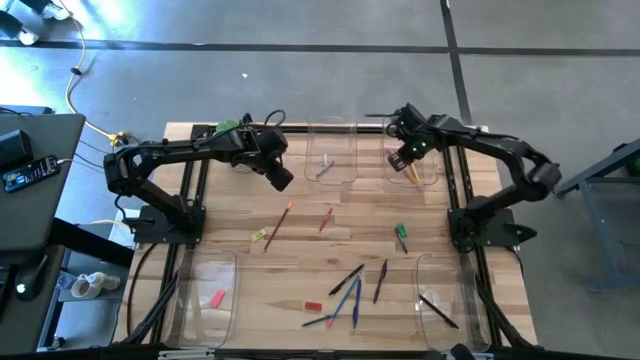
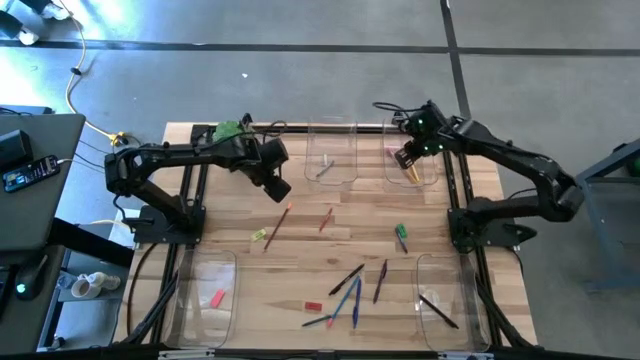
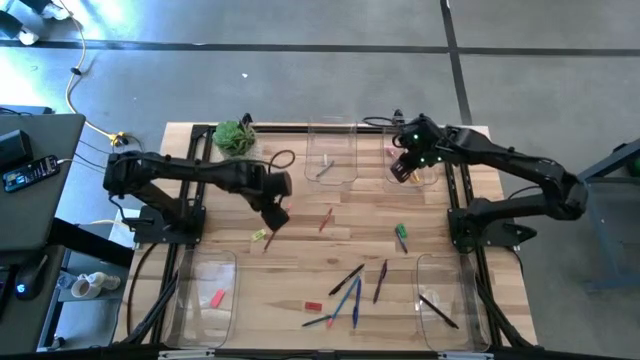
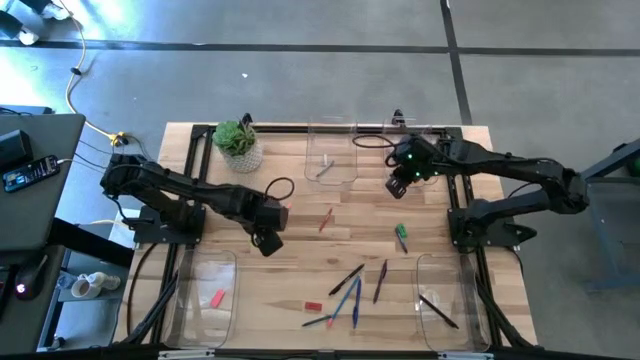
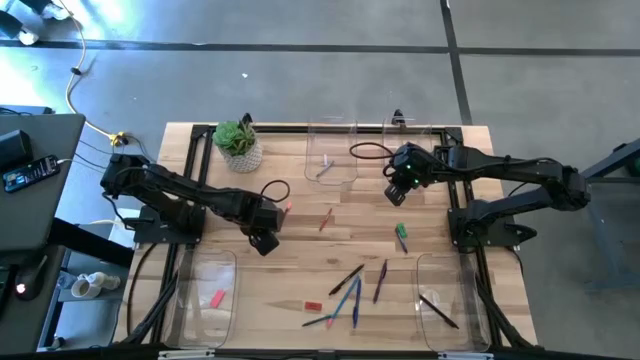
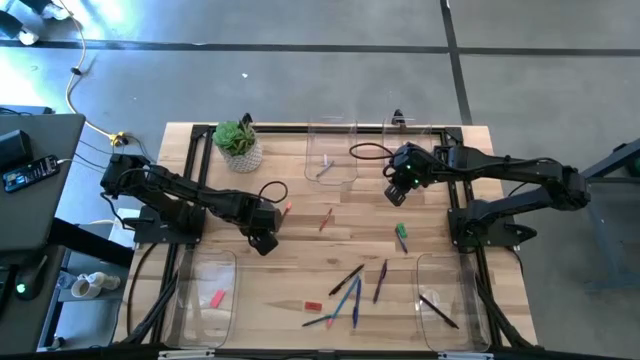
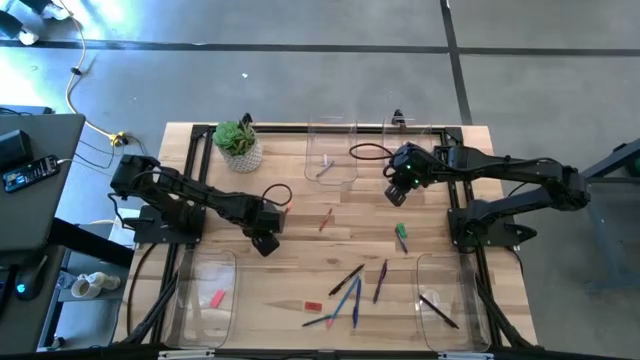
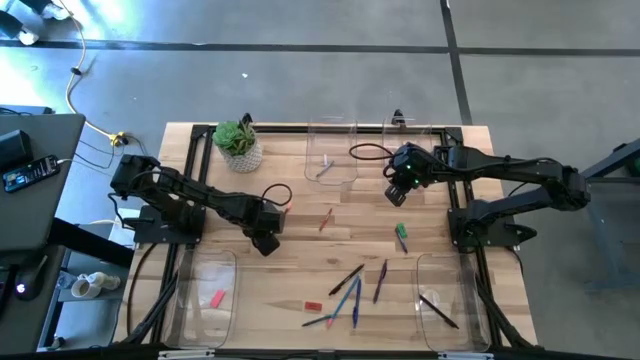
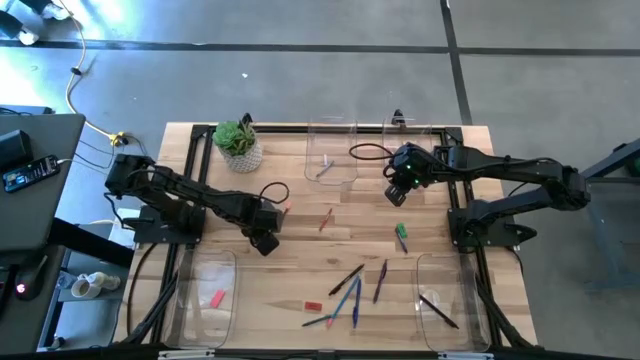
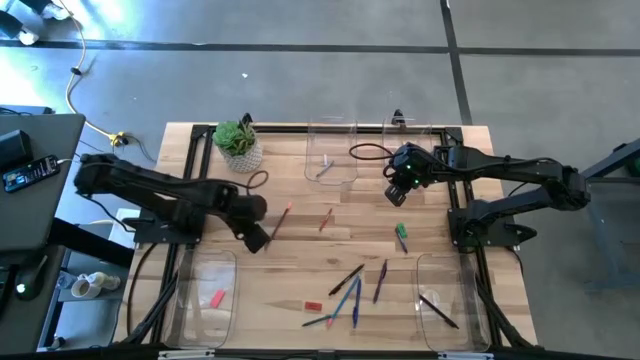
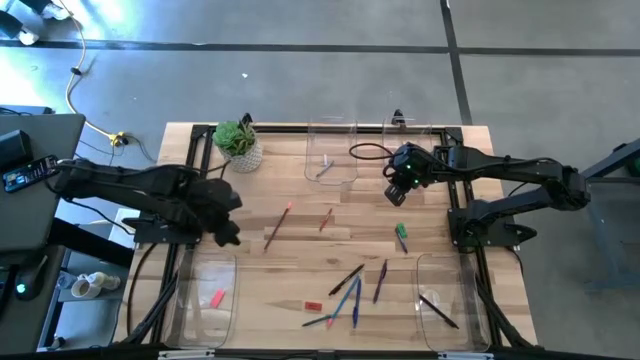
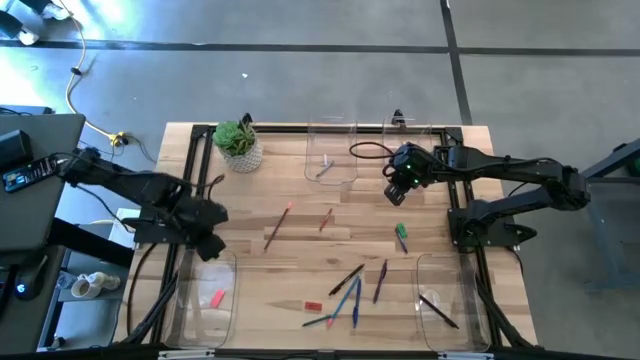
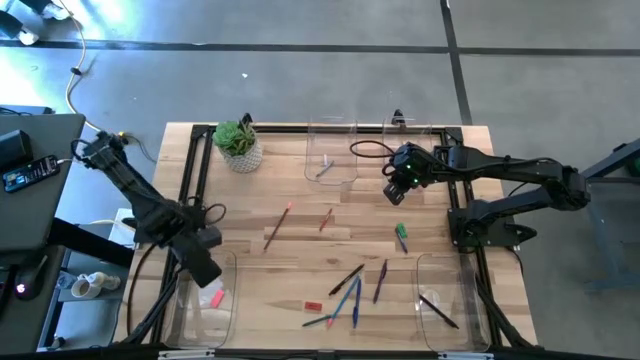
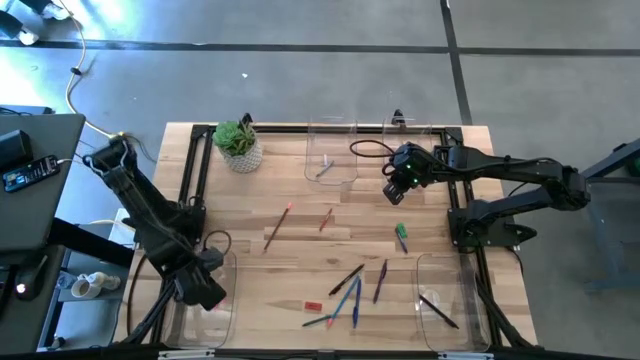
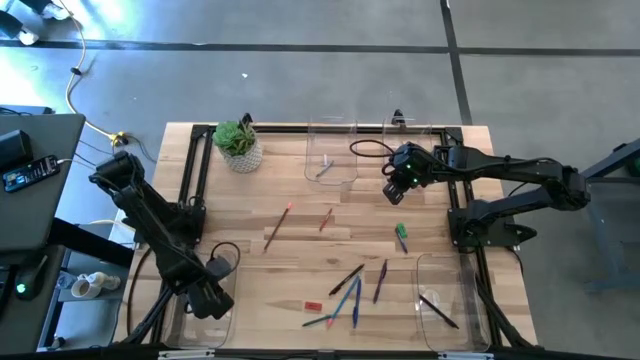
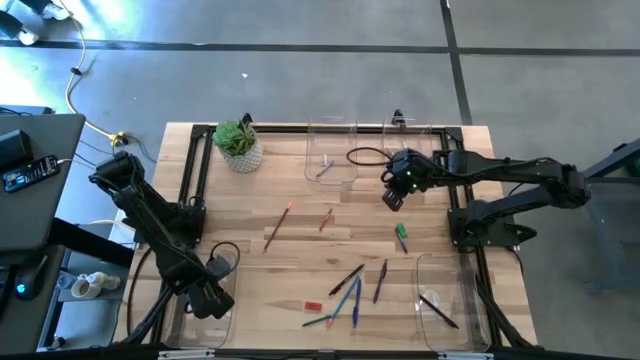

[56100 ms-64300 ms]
Task: Sort crayons/erasers/pens/pencils in bins
Put the light green eraser into the bottom left transparent bin

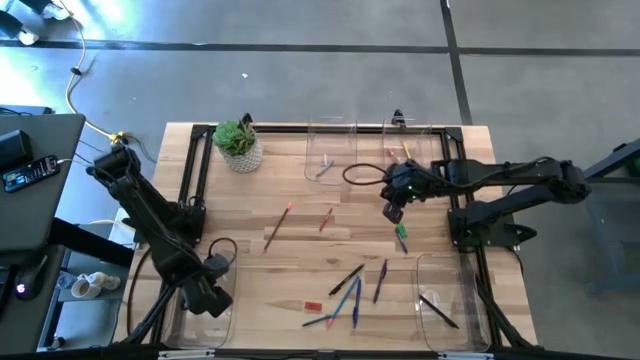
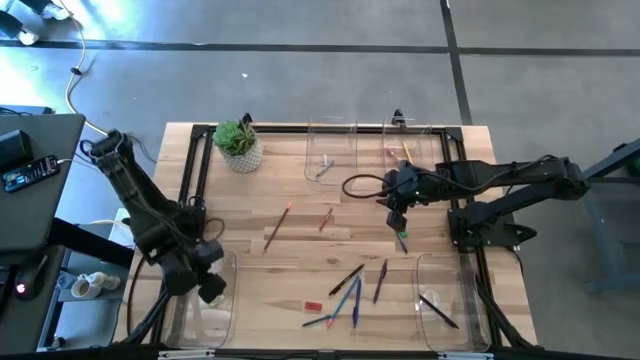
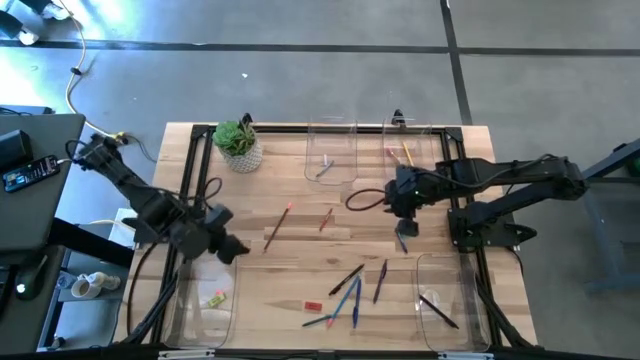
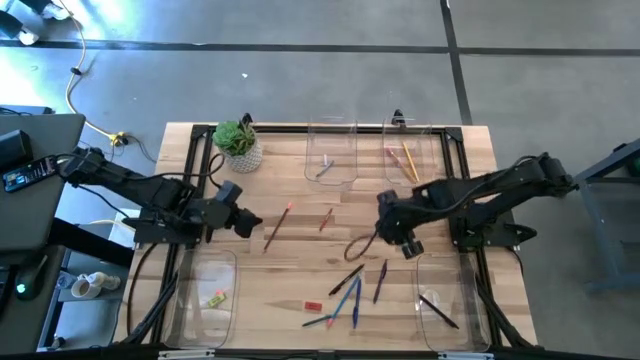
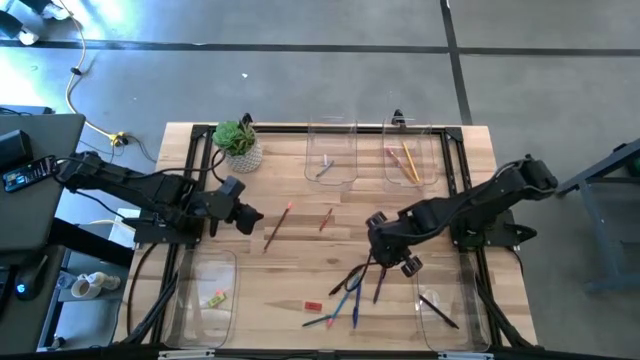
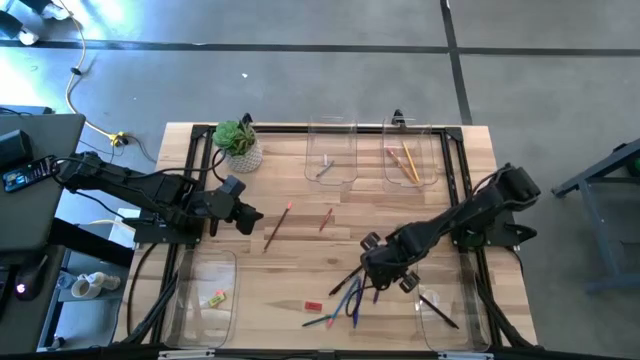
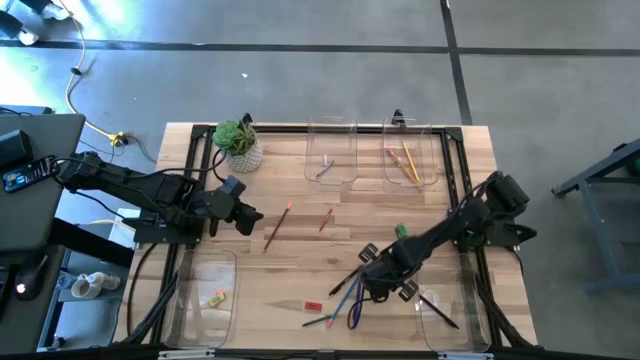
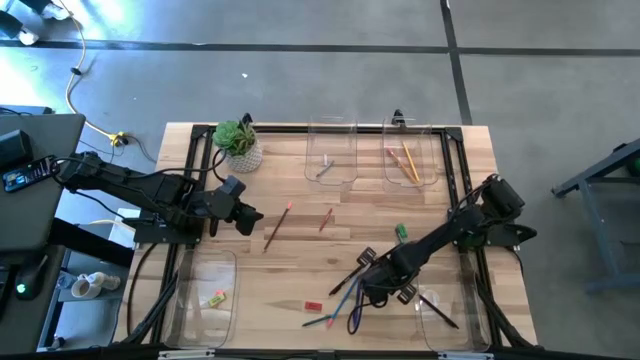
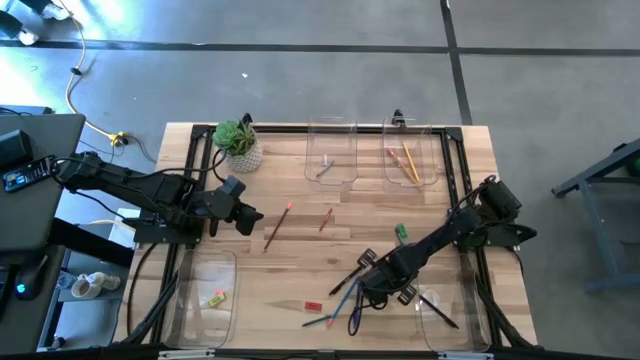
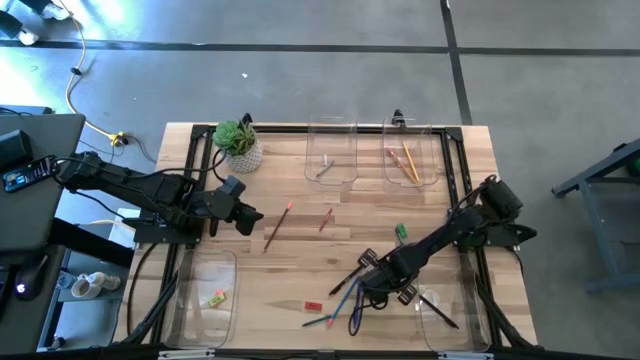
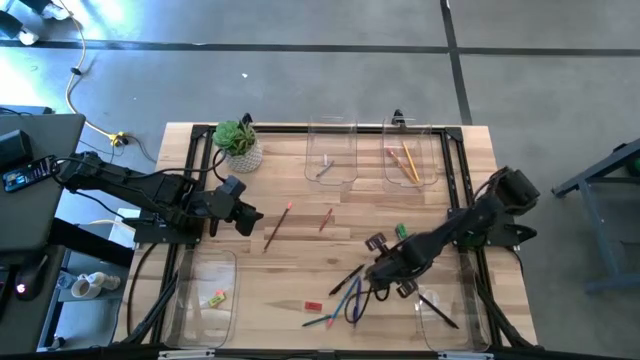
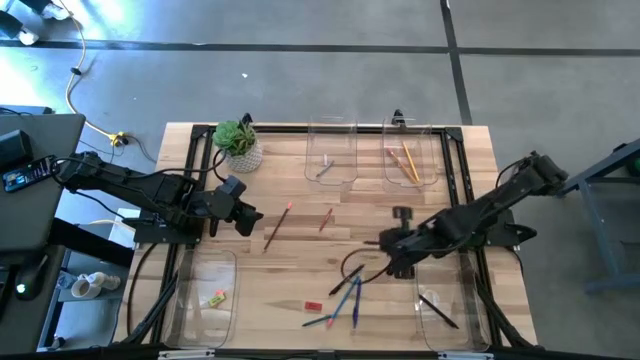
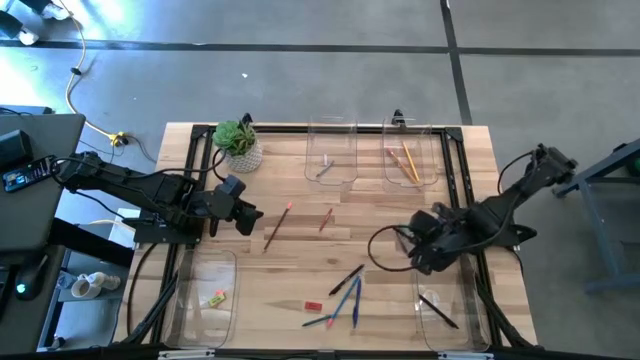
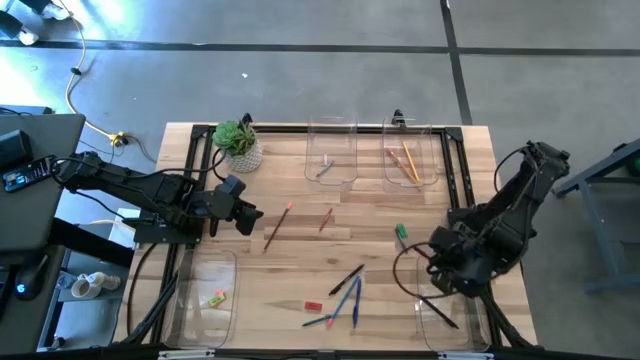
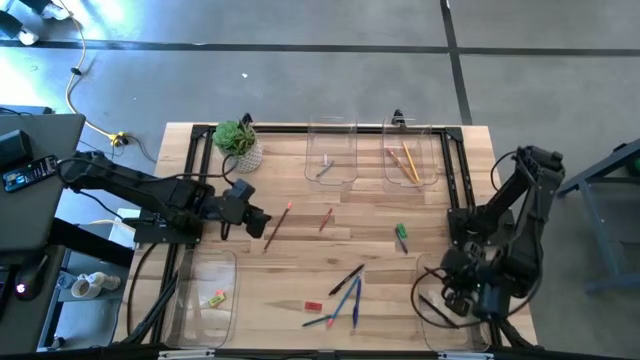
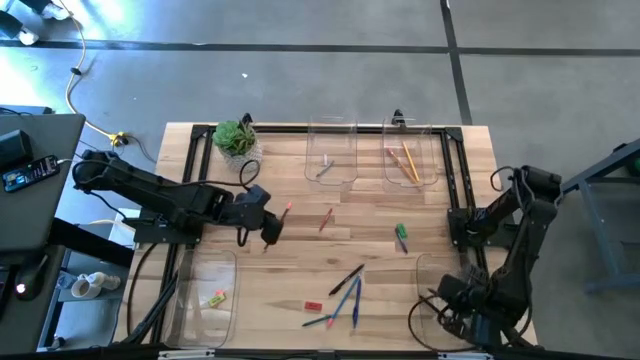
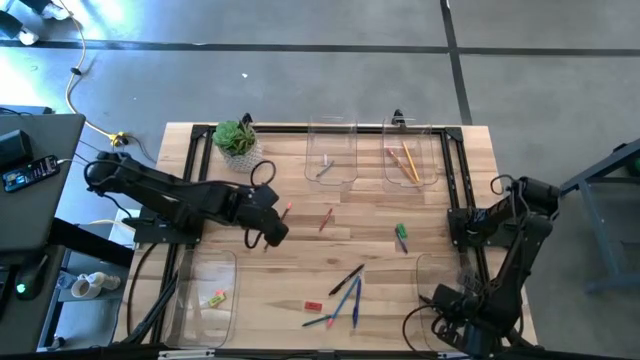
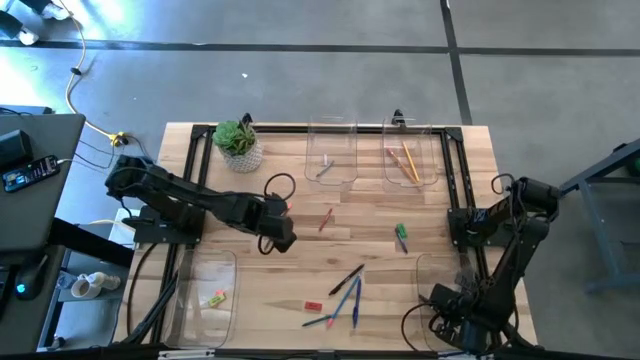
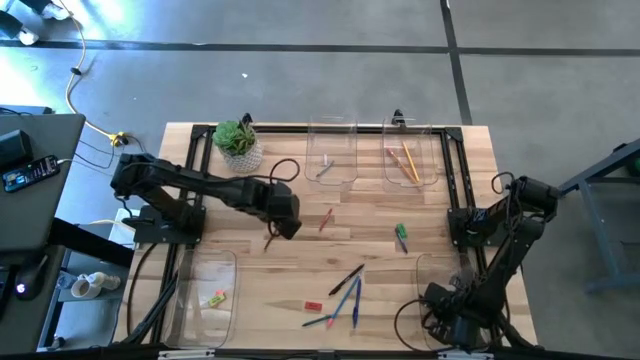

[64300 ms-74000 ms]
Put the purple pen into the bottom right transparent bin

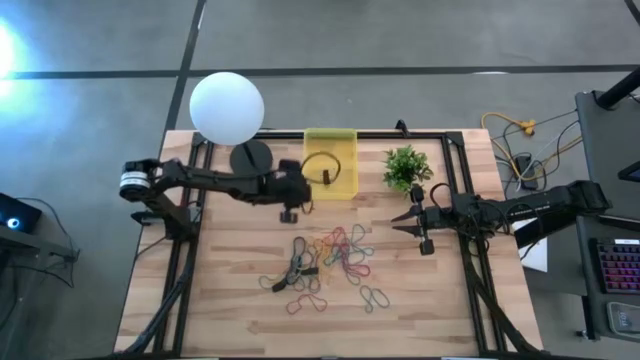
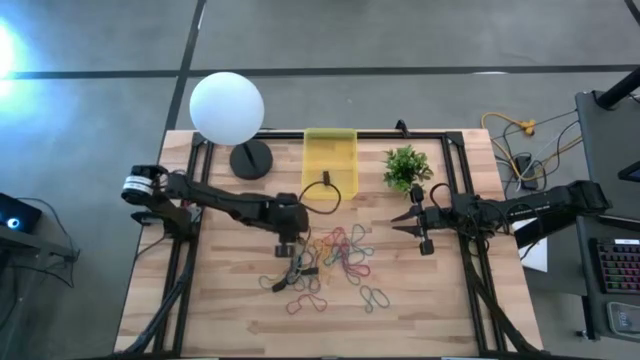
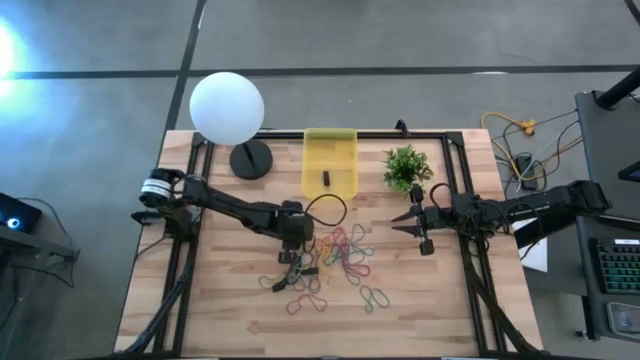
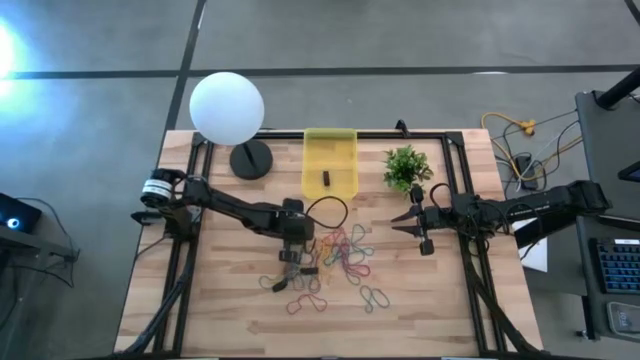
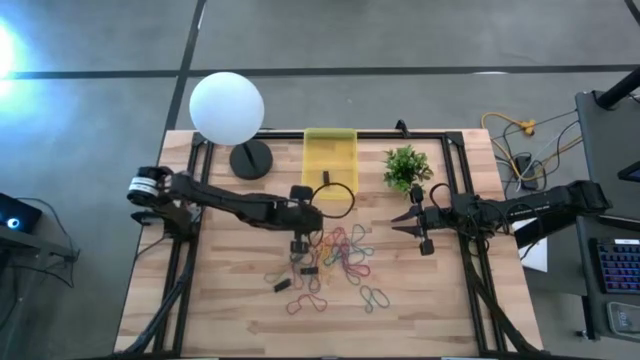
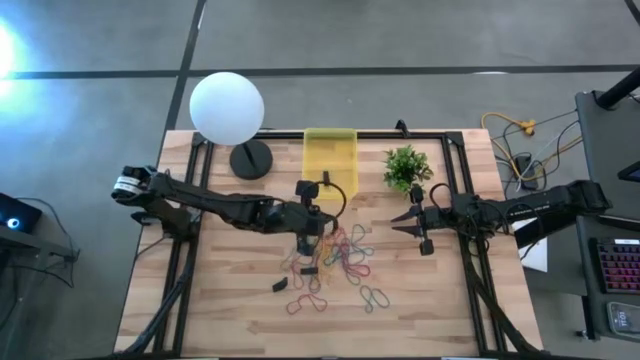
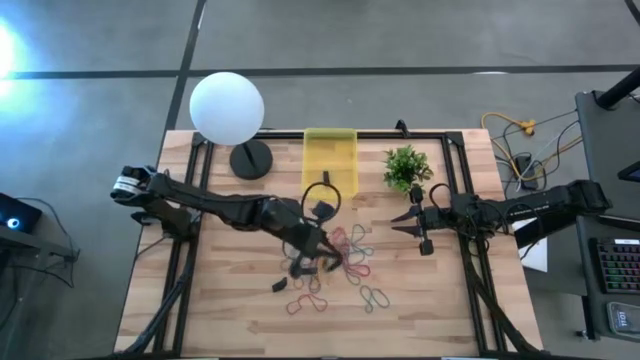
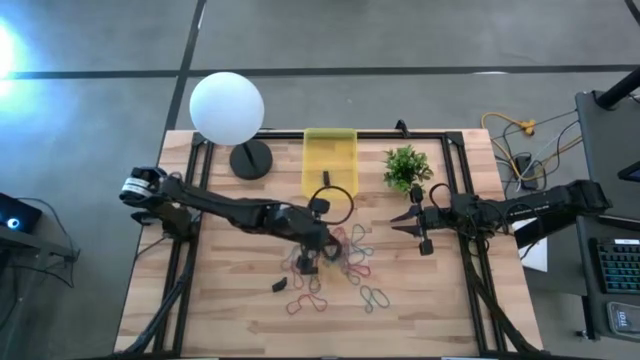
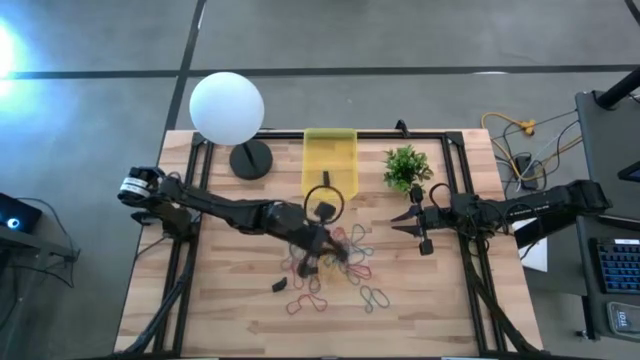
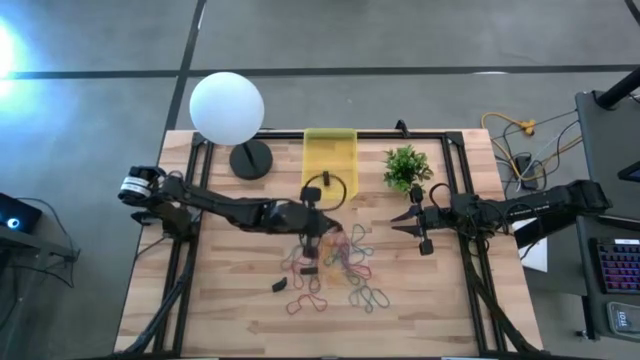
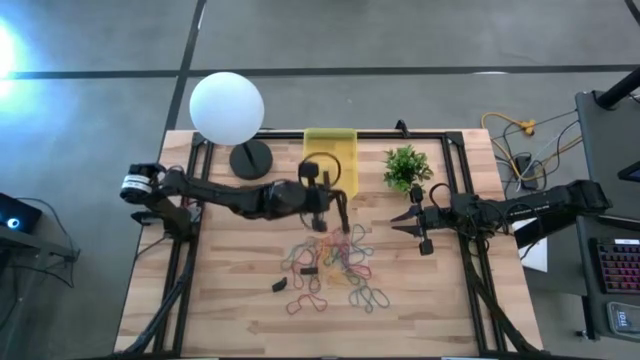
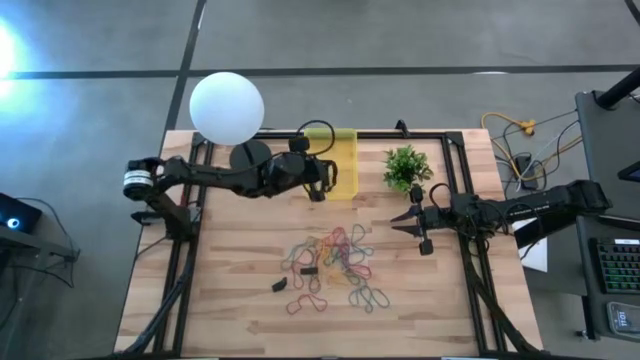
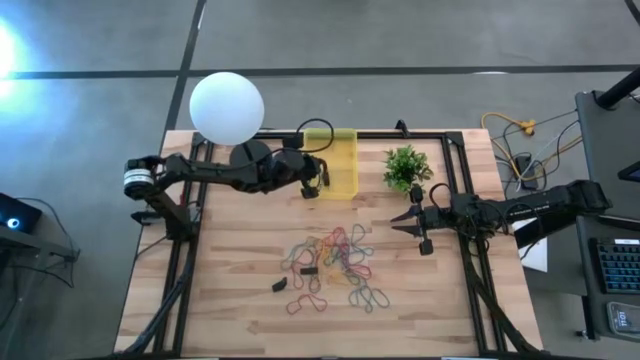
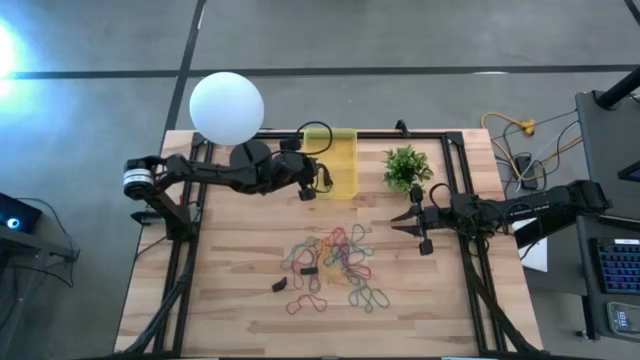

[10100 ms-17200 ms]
Task: Pick and place rubber bands into bin
Put the black rubber band into the yellow bin
